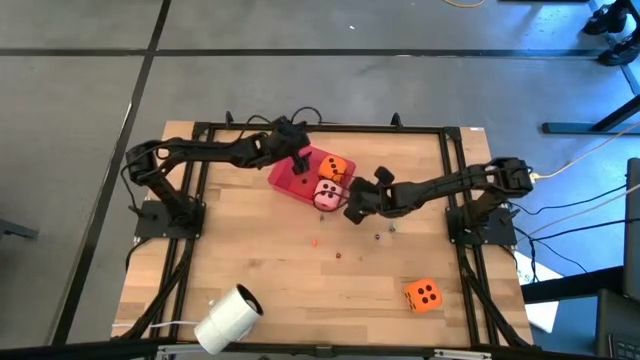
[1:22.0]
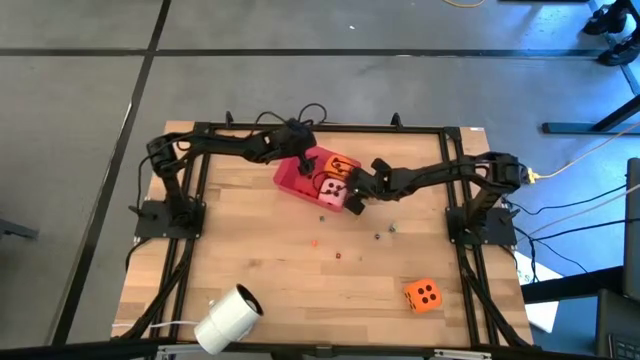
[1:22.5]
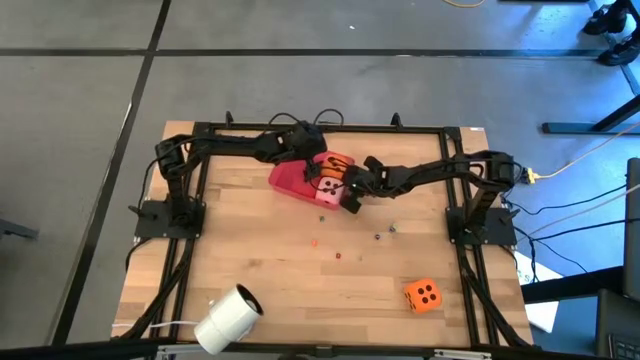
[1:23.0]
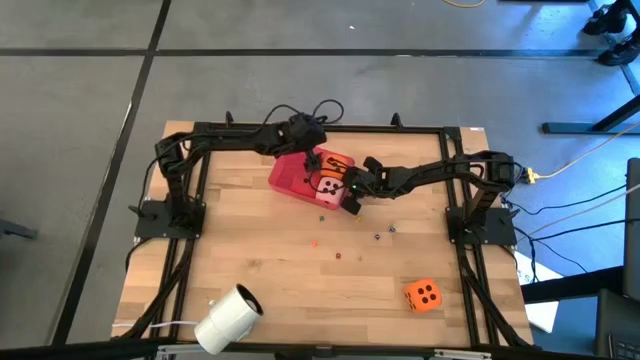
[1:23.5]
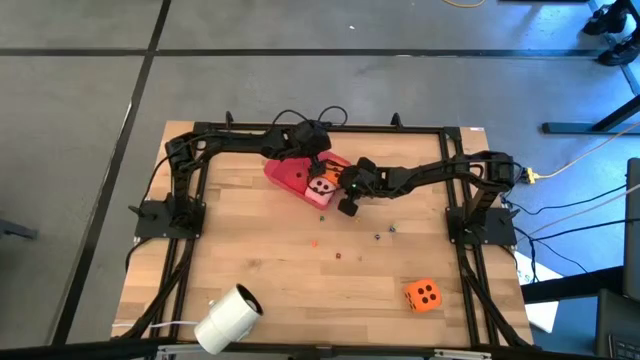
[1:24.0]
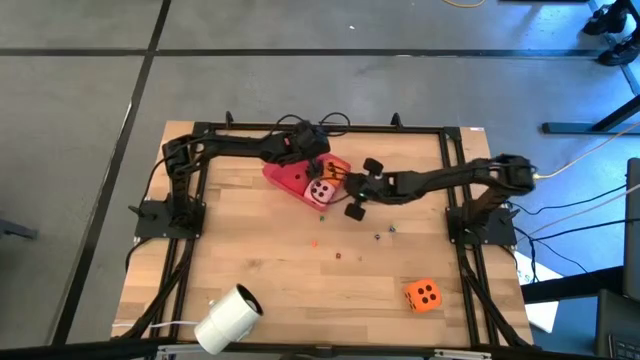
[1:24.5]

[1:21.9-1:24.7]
Task: Pick & Place Dice
Adjust the large orange die in the red bin

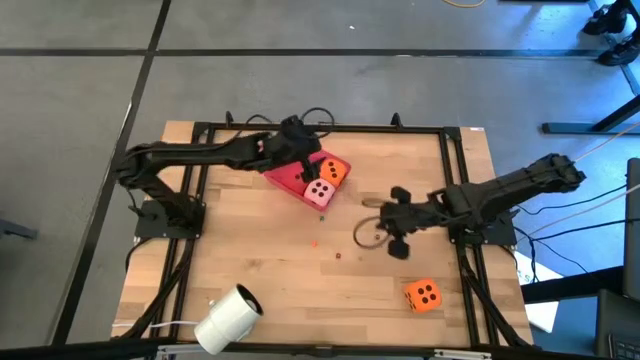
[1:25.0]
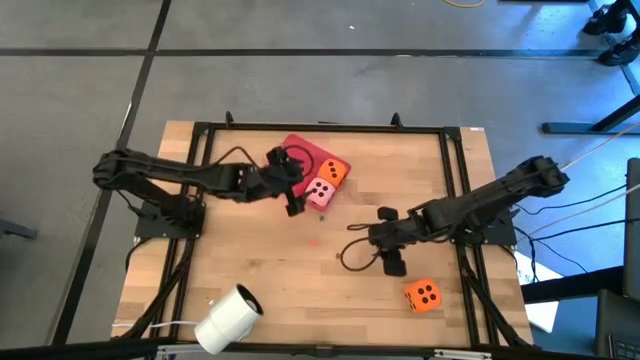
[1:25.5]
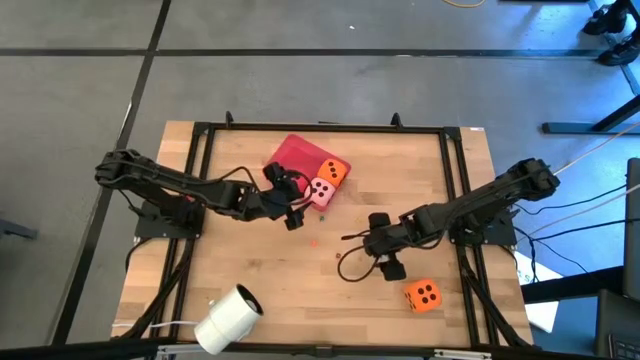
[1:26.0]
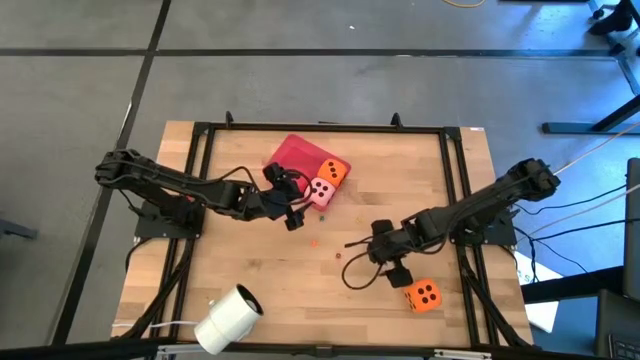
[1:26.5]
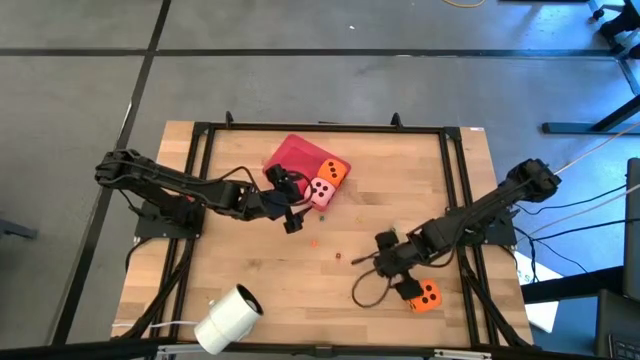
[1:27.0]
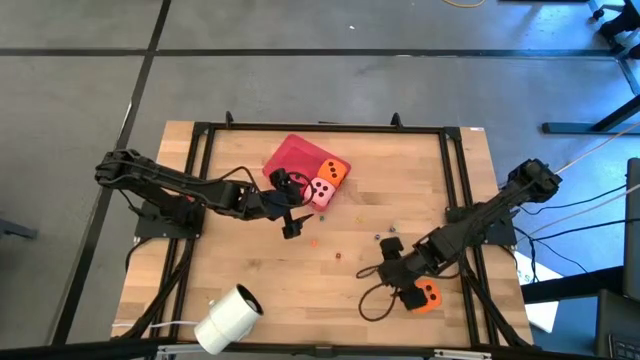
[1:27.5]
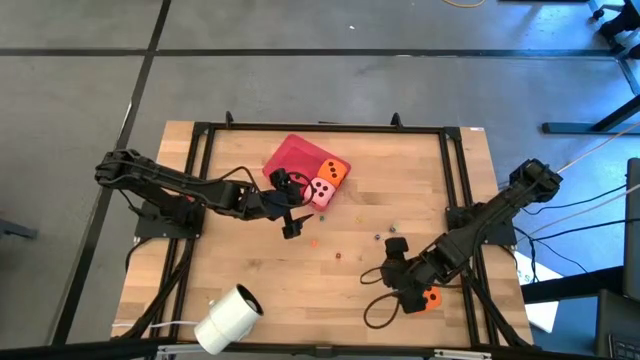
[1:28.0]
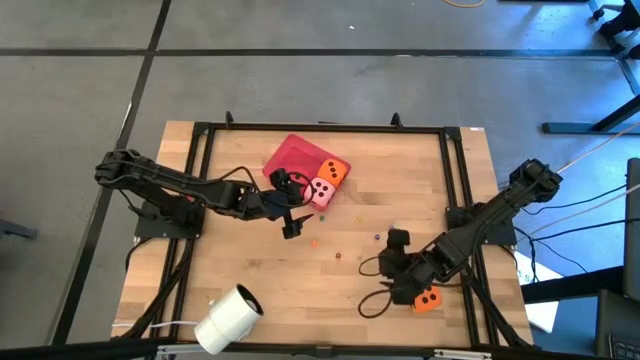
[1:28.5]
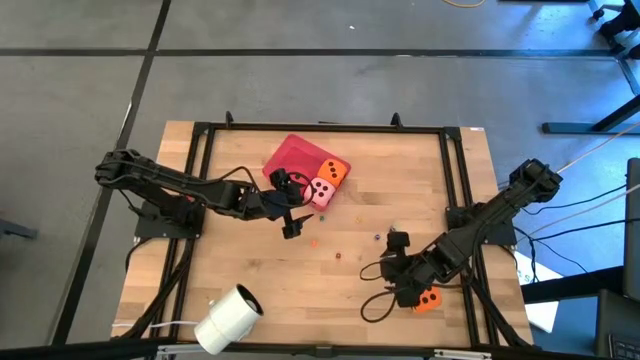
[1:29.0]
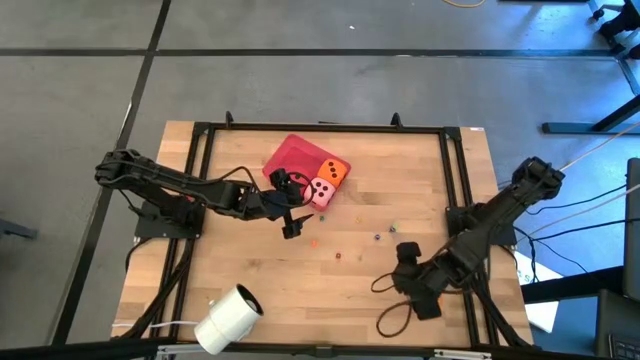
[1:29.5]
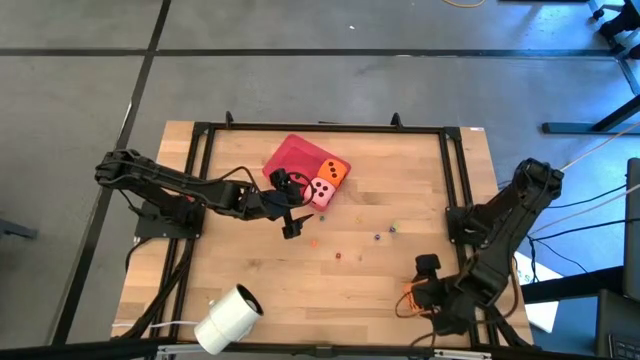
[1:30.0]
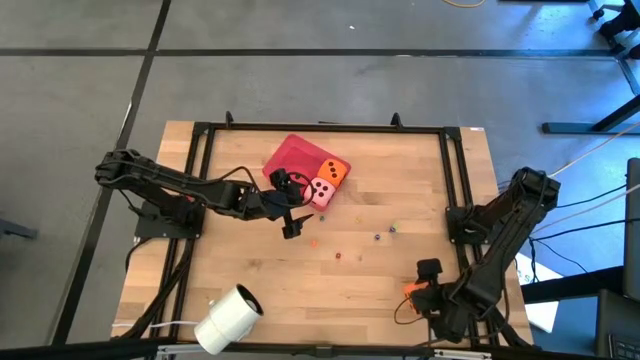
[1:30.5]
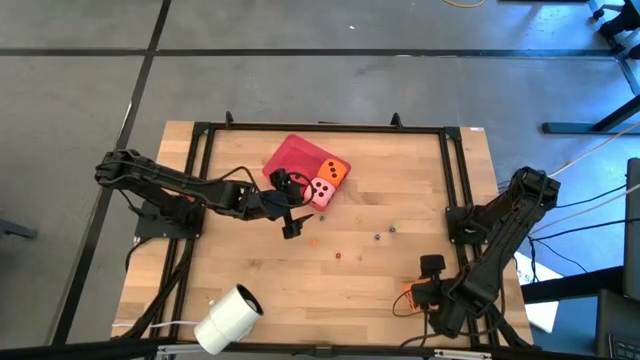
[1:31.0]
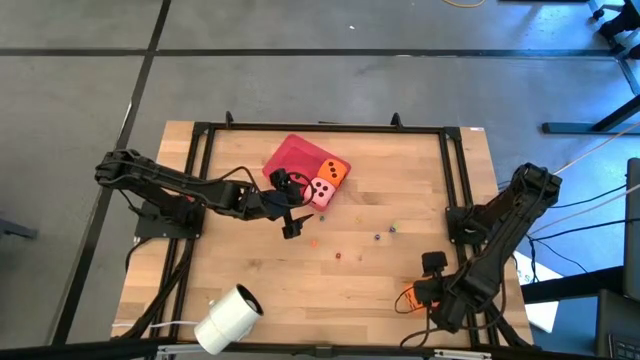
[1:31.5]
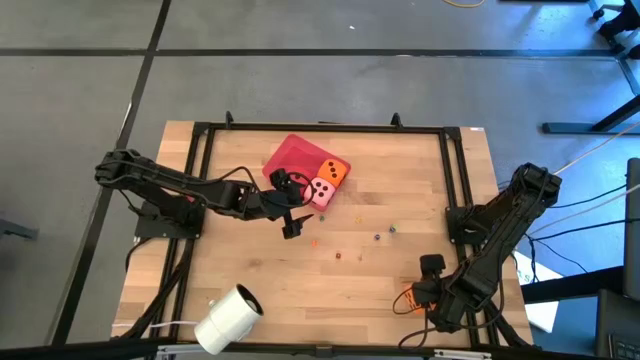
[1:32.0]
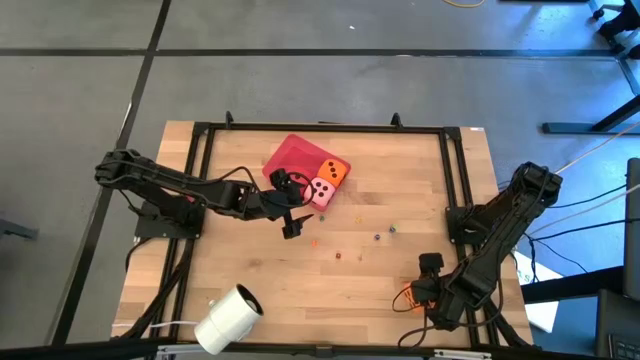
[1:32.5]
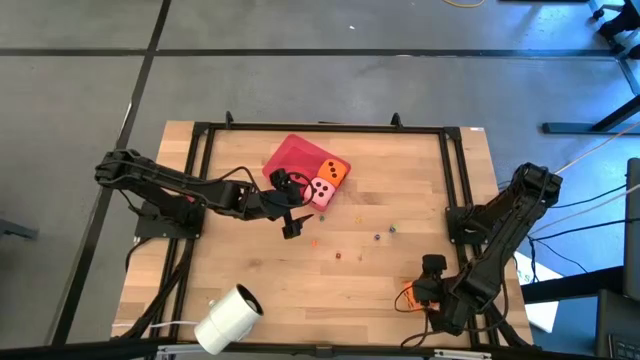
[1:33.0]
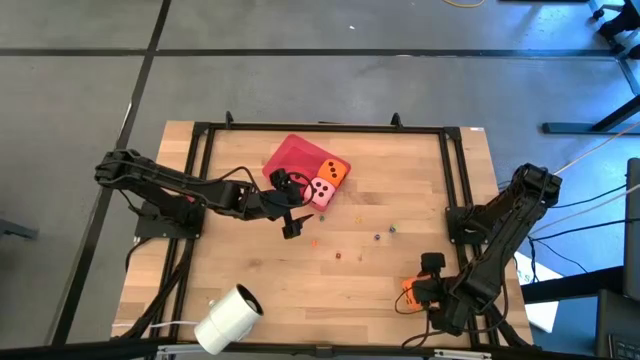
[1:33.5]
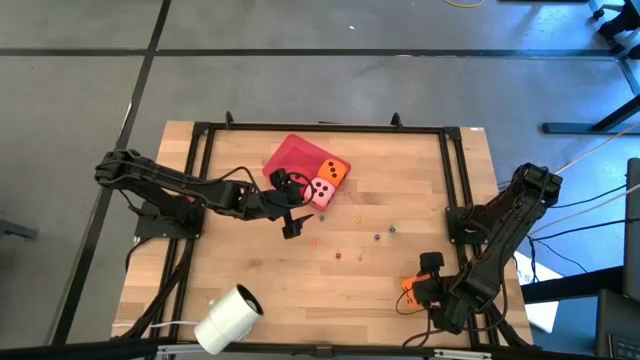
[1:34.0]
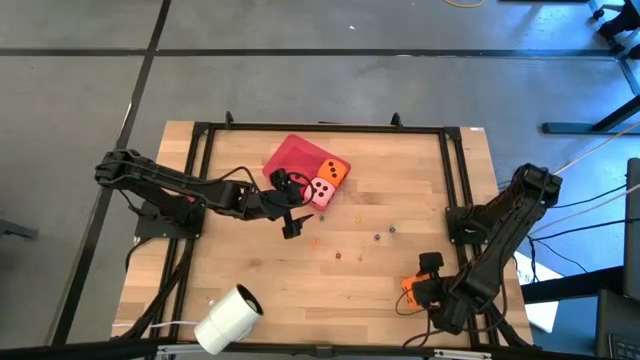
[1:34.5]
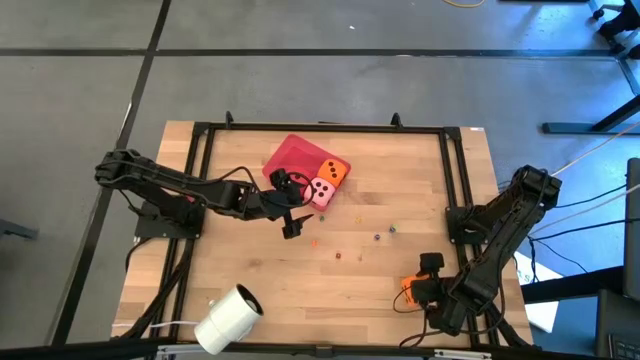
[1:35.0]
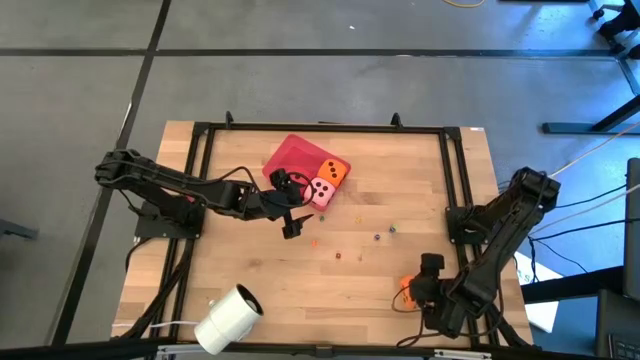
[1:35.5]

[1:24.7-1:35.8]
Put the large orange die into the red bin

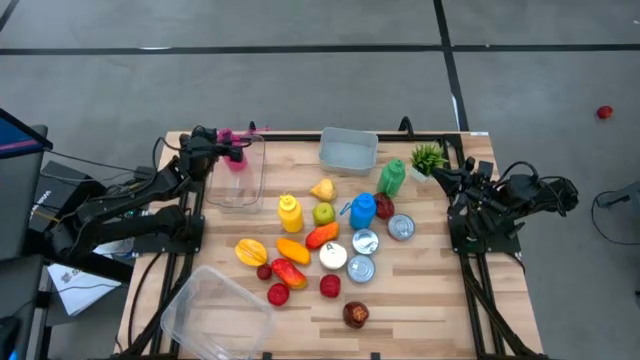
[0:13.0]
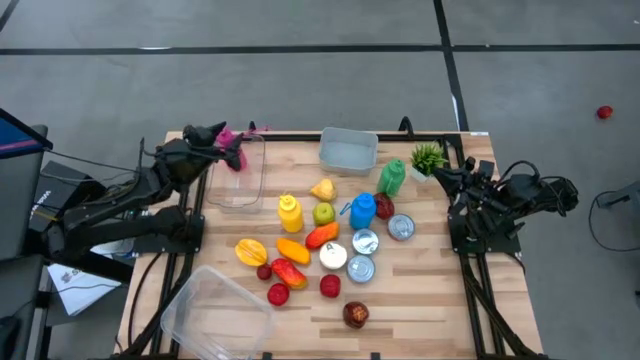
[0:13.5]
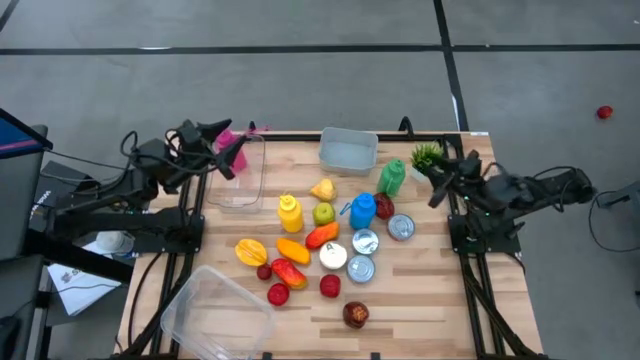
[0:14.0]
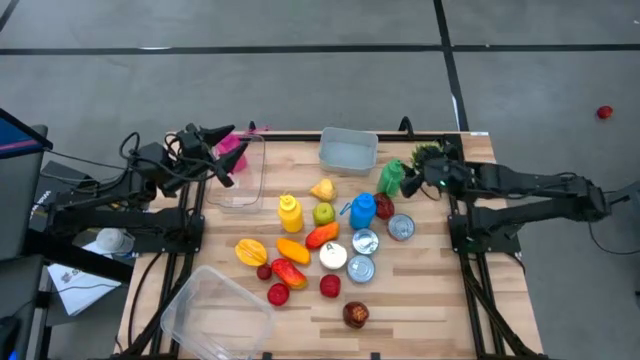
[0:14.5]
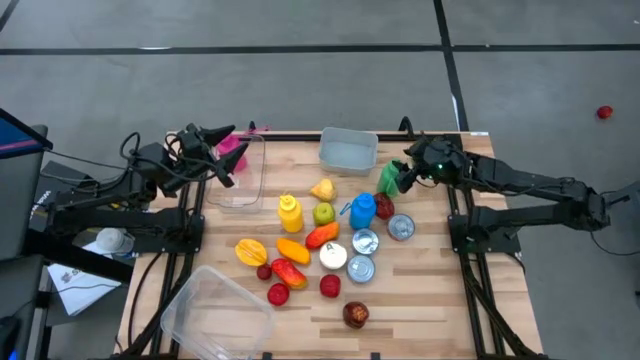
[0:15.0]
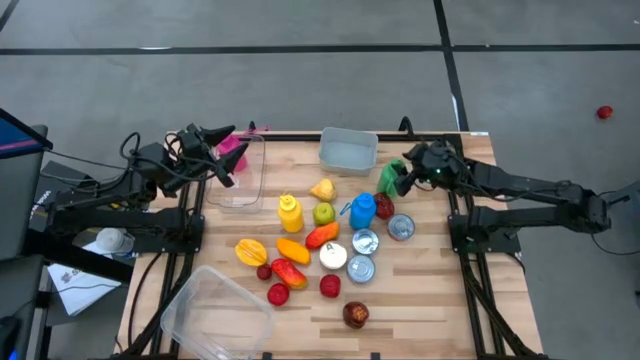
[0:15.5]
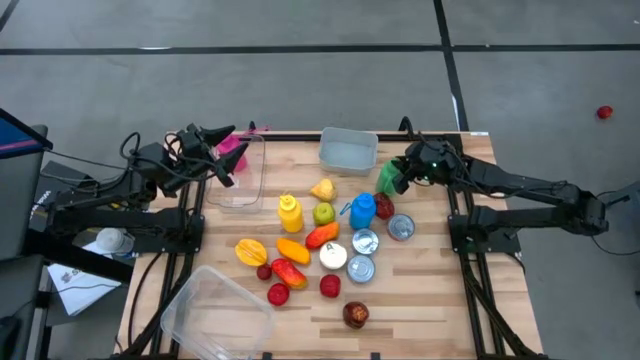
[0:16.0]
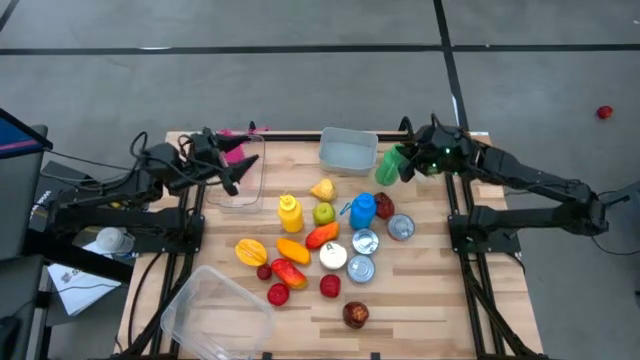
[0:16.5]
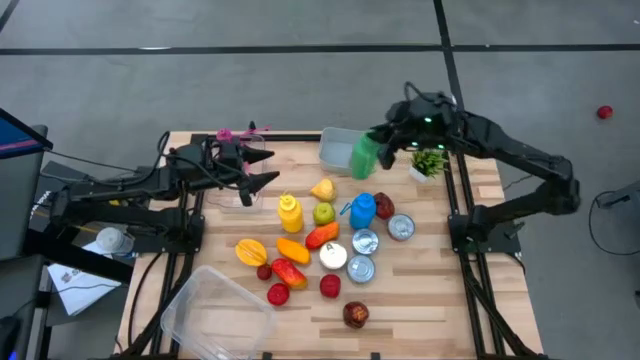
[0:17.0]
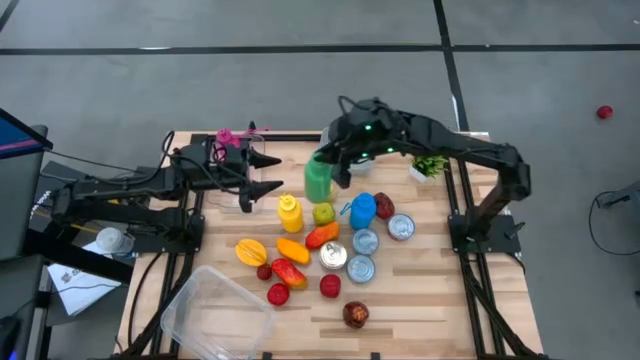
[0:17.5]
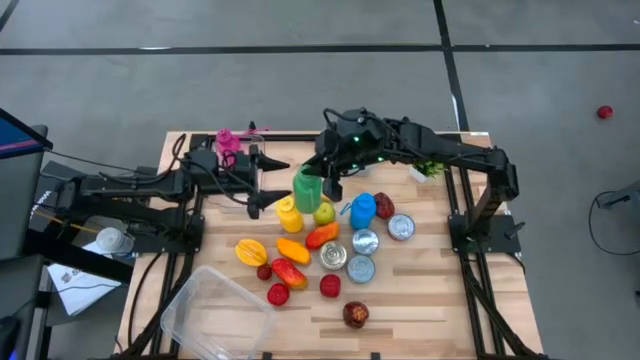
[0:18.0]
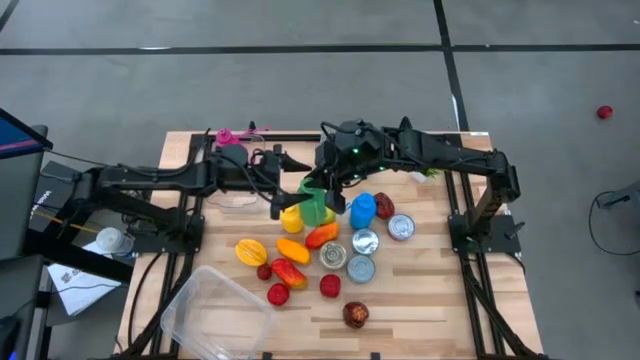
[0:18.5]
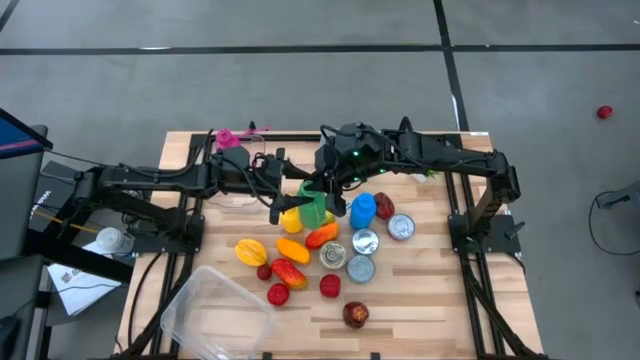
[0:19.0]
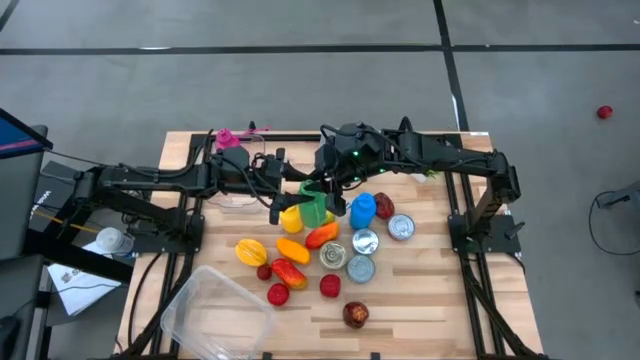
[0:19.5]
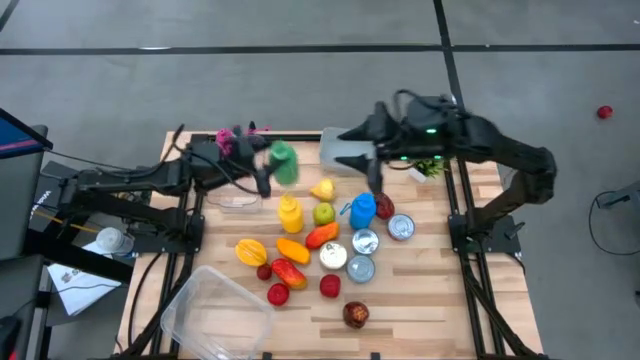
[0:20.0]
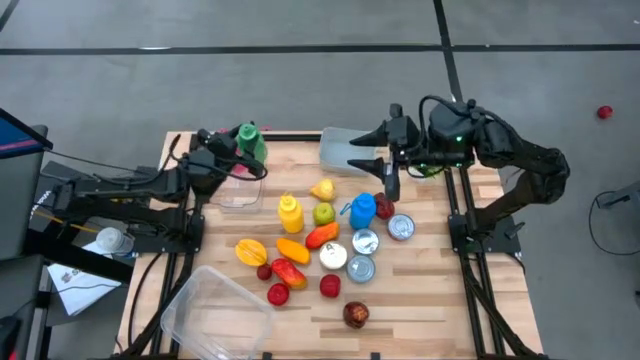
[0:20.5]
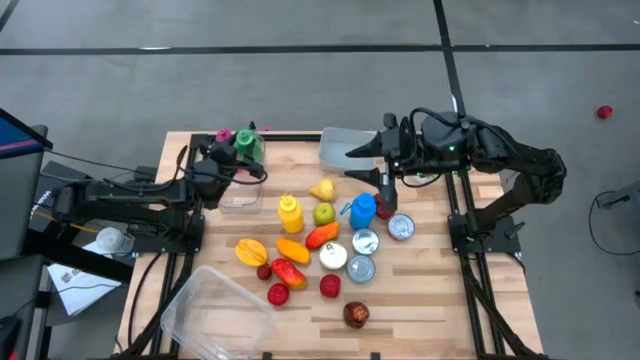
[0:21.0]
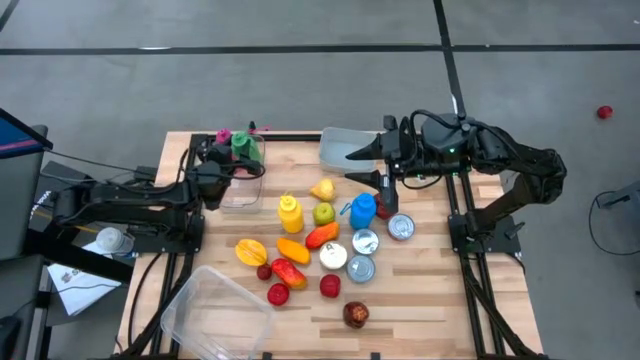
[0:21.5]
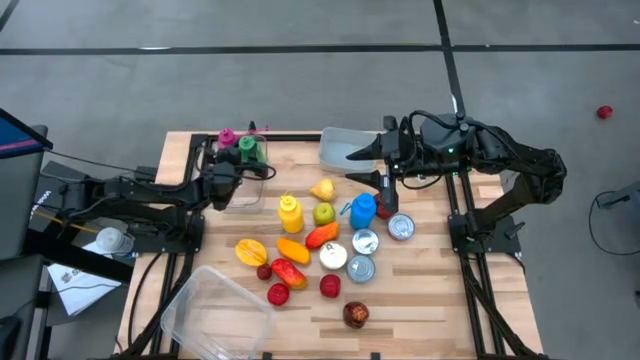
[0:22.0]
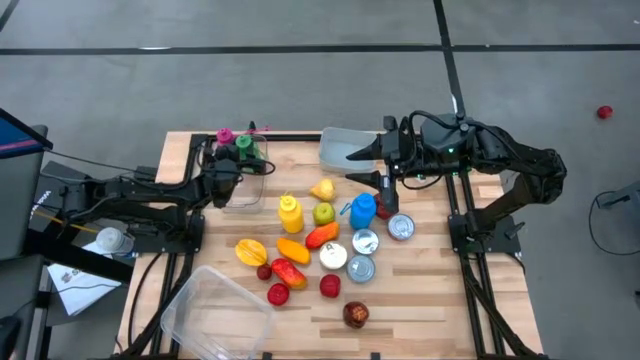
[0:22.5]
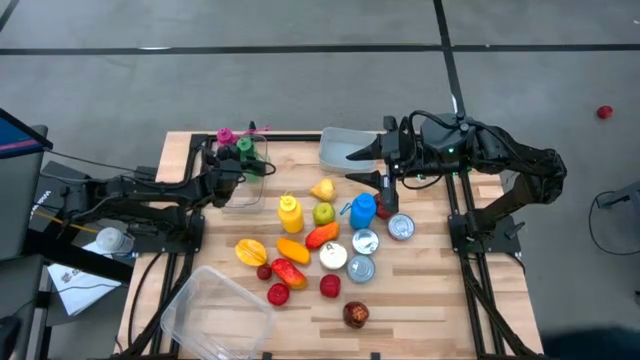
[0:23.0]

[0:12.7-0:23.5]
Task: Pick & Place Food Item
Put the green water bottle into the transparent bin
